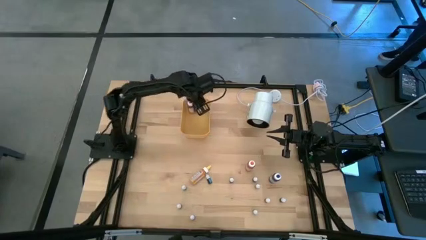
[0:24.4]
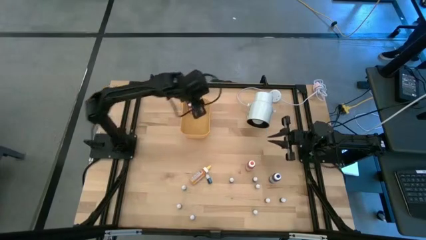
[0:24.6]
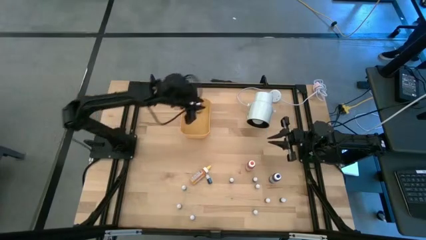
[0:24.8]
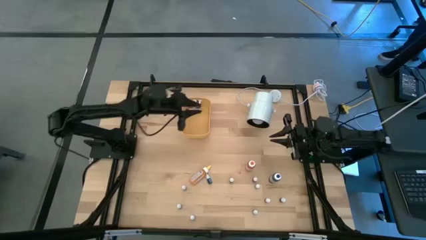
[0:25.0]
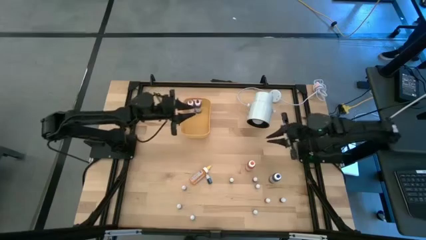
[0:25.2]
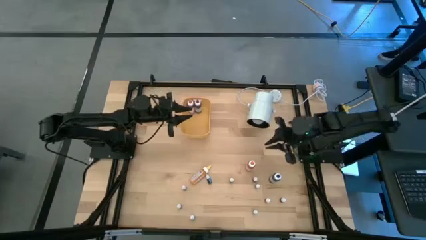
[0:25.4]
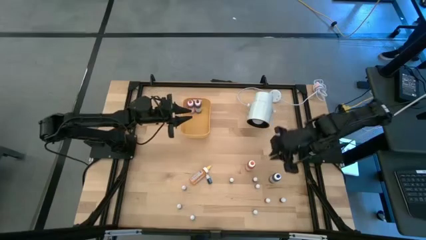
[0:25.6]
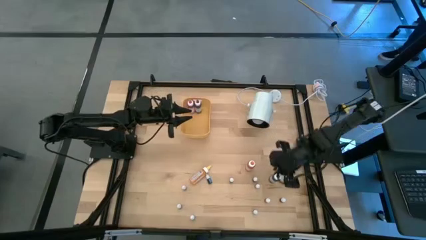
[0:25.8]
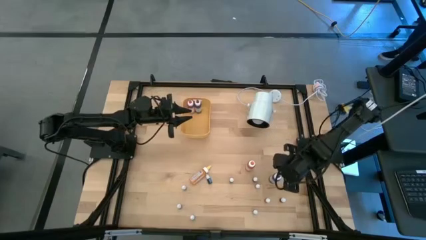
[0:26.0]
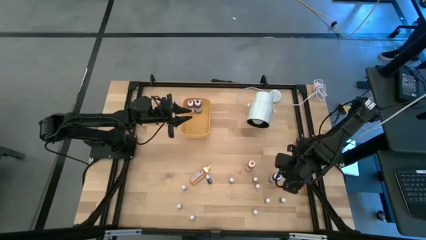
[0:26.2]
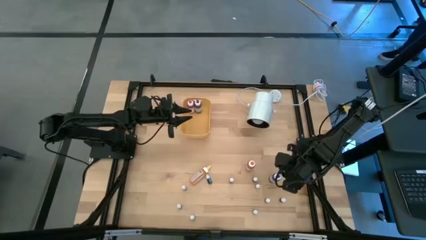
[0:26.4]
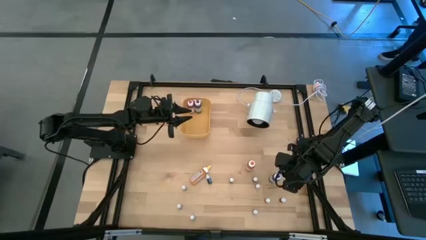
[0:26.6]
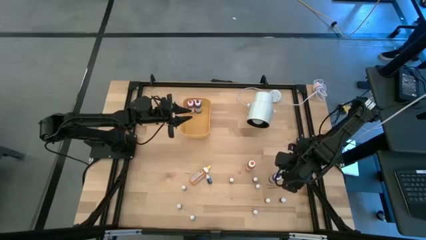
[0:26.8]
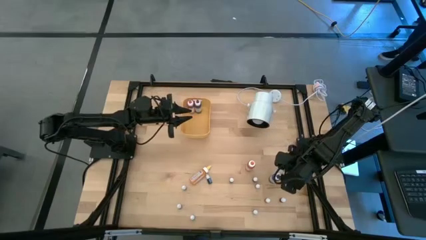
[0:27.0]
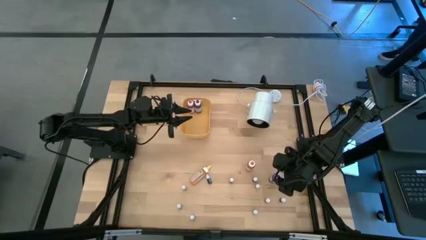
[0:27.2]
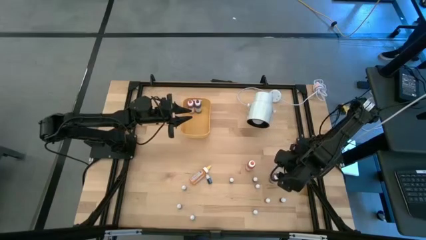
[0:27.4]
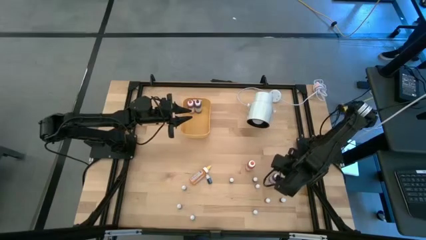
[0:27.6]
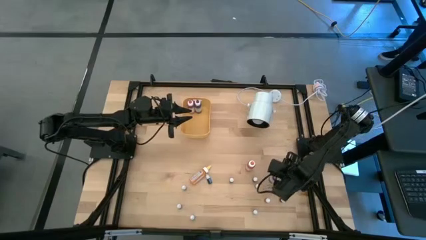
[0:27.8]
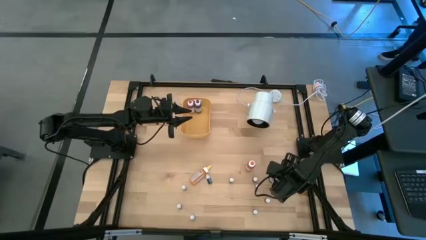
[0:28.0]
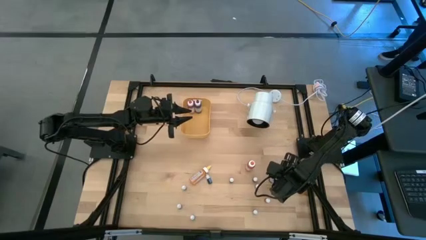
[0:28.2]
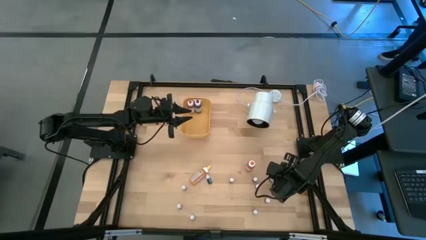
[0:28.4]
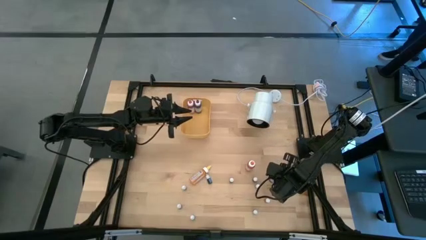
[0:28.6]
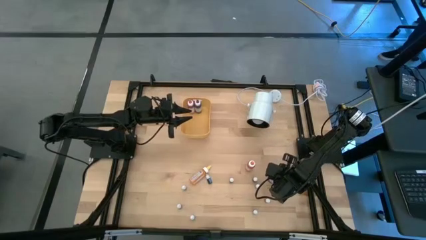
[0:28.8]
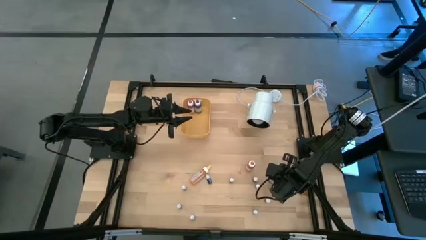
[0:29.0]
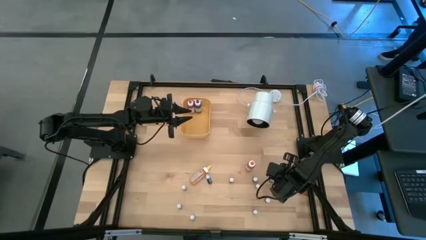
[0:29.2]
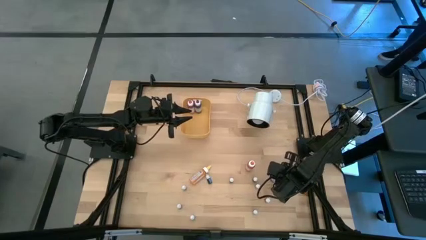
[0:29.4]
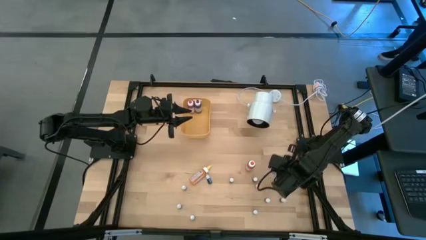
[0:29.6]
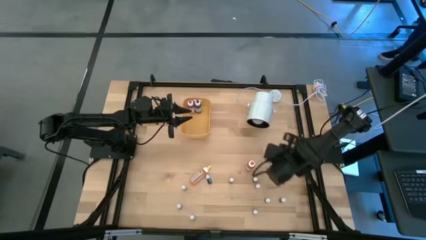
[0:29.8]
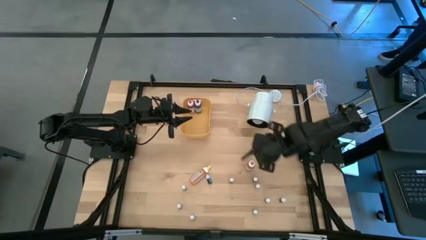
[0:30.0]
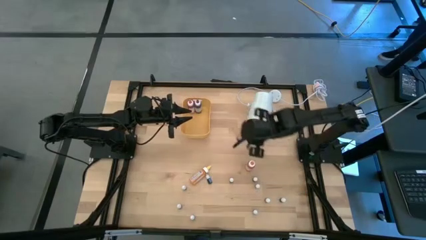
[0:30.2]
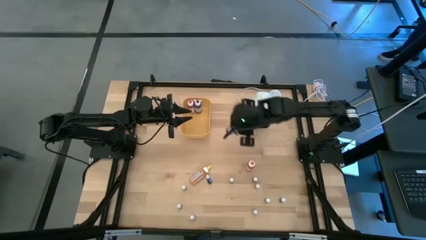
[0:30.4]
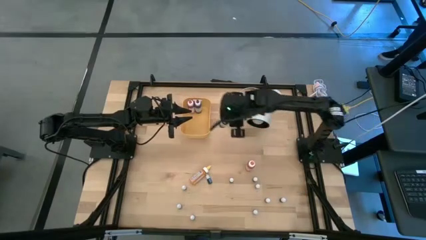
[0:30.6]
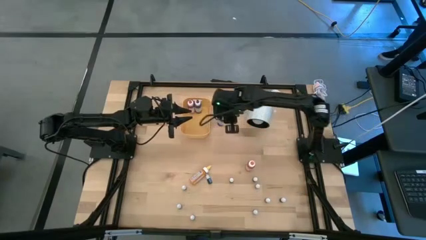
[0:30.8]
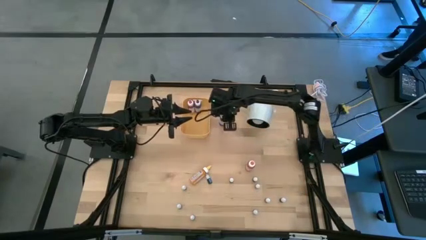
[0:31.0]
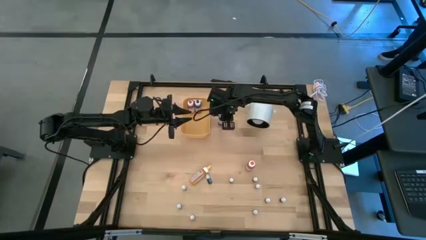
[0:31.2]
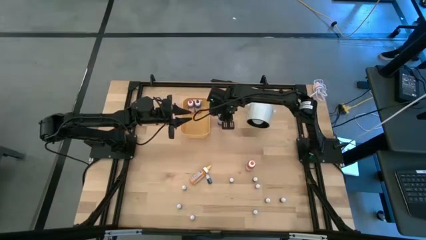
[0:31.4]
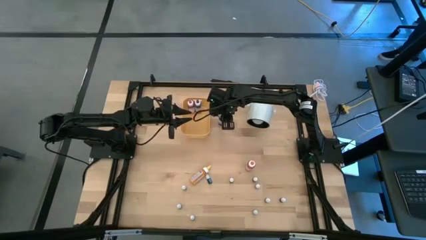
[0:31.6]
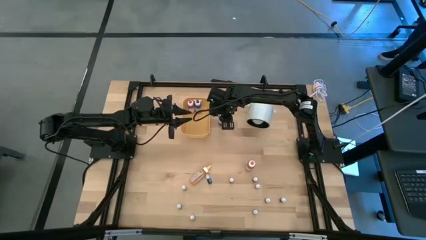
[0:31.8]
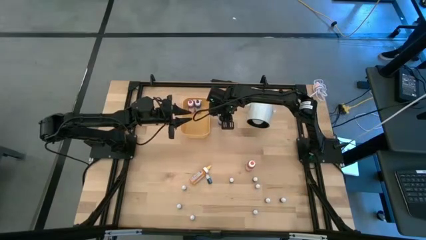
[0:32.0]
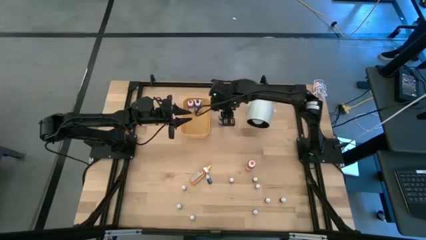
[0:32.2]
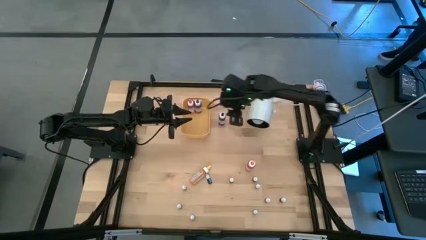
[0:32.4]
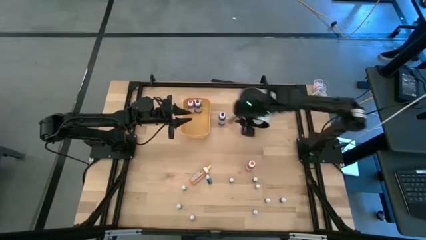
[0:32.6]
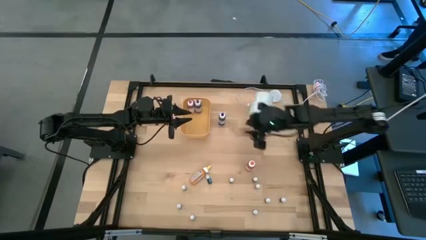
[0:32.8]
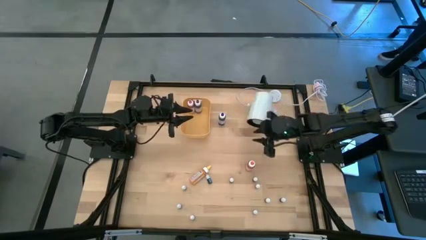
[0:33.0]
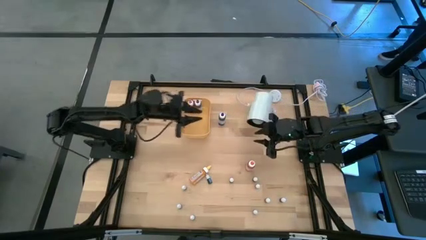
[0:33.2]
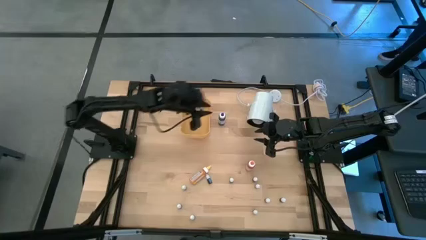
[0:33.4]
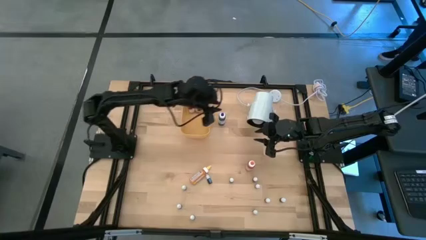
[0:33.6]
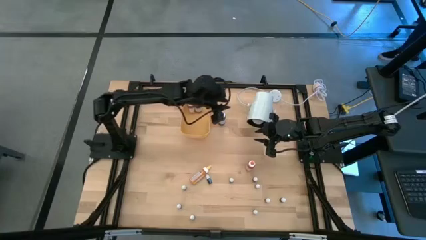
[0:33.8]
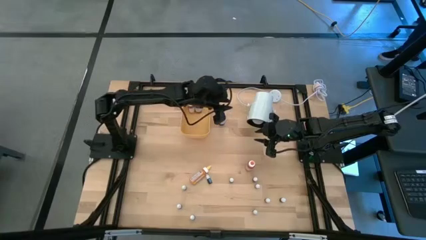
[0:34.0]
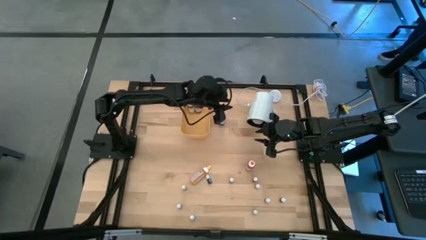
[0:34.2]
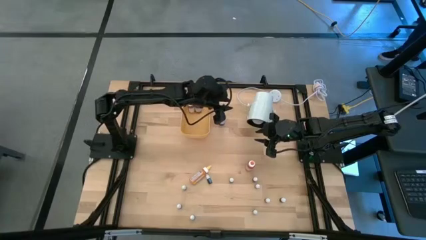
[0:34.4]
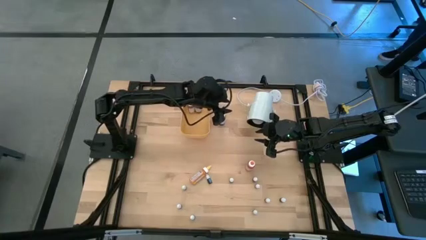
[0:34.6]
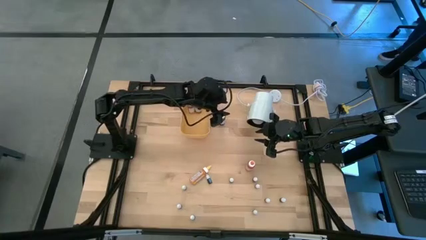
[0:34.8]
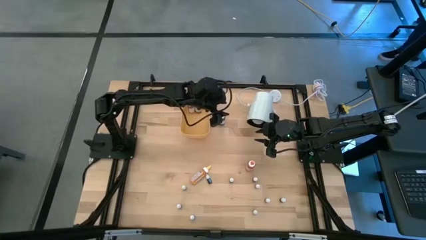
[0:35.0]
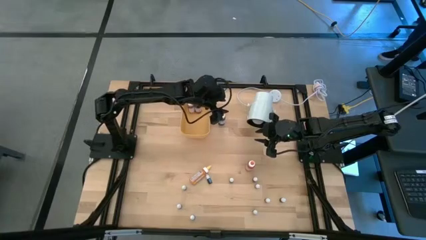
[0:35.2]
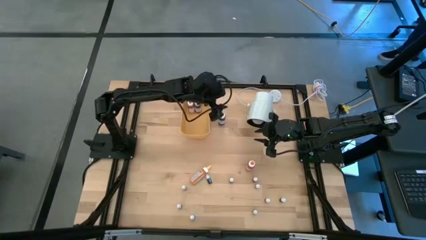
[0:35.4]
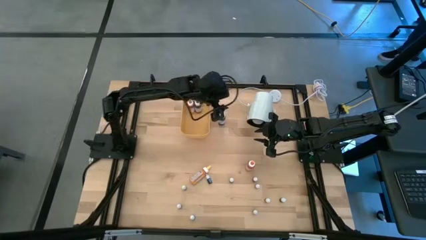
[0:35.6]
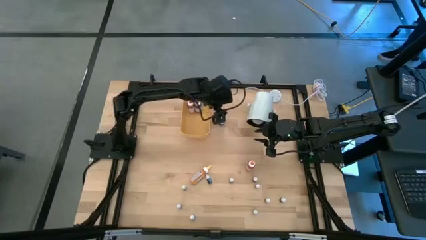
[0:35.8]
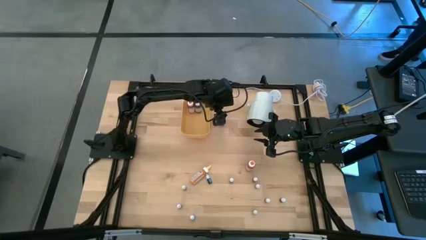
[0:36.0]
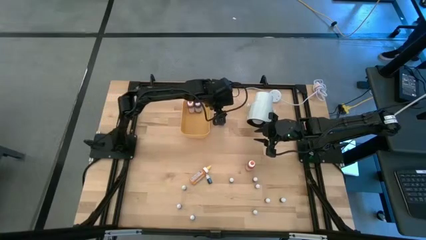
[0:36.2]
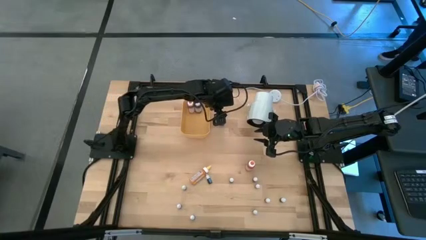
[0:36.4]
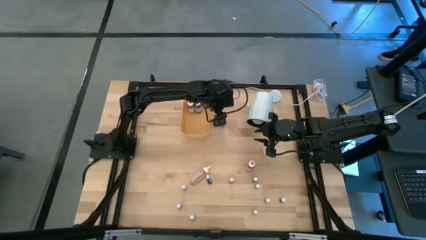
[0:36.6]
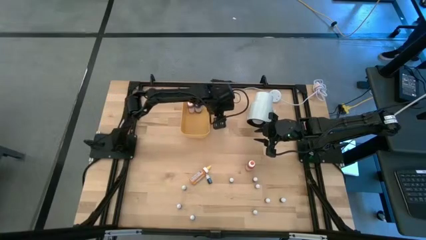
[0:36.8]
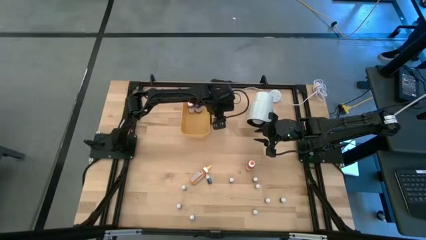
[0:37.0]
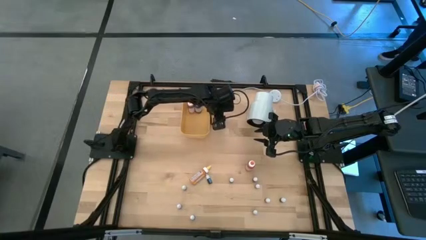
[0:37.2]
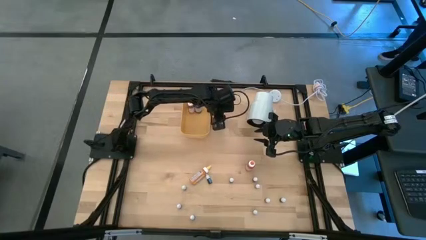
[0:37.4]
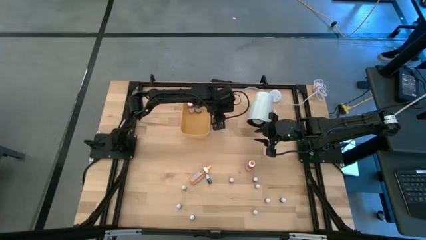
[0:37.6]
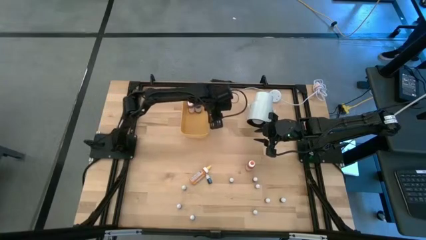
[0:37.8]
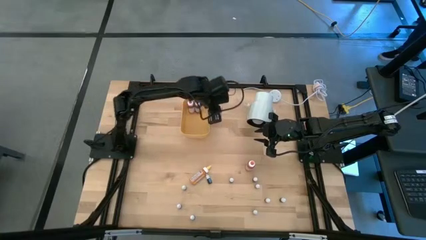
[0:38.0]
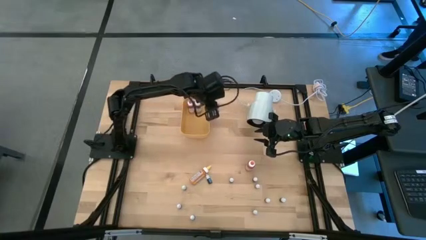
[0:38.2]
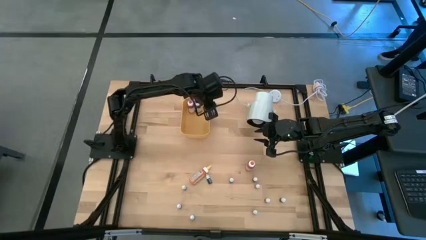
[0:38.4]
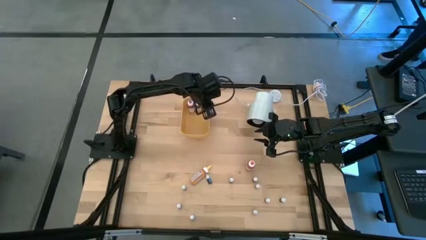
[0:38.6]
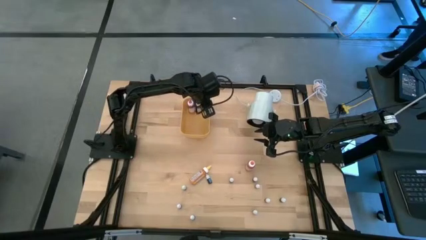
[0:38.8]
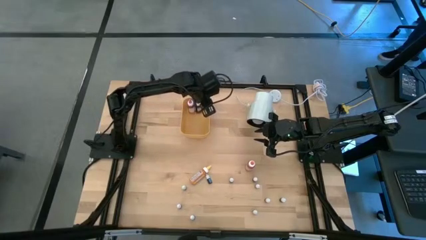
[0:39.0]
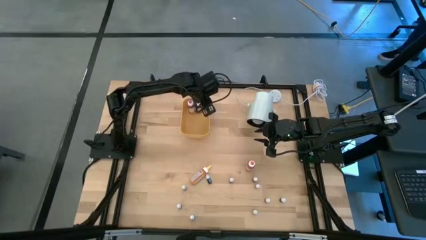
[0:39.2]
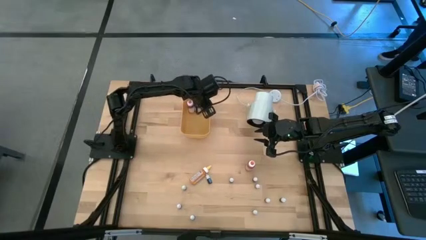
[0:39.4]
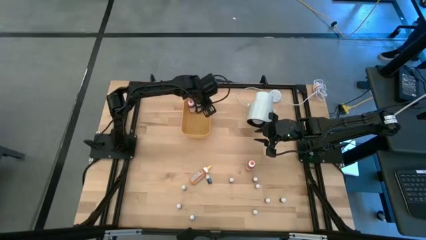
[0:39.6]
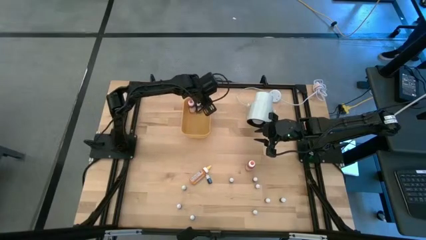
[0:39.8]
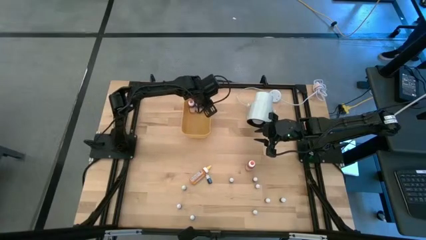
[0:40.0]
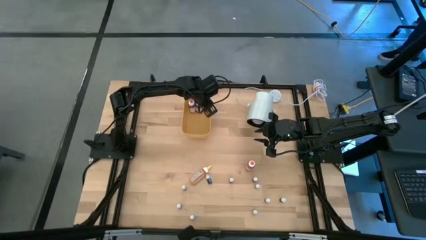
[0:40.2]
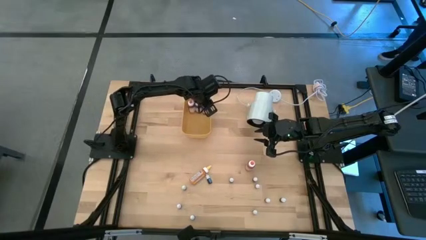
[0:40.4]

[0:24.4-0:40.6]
Task: Pick & Place food coloring
Put the large blue food coloring bottle into the yellow bin
